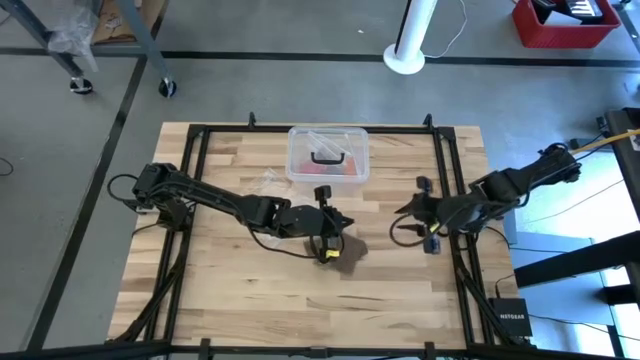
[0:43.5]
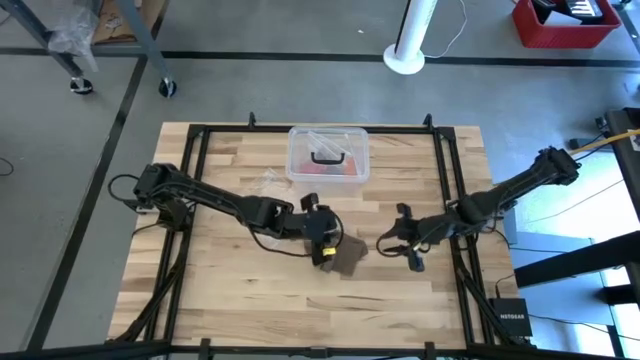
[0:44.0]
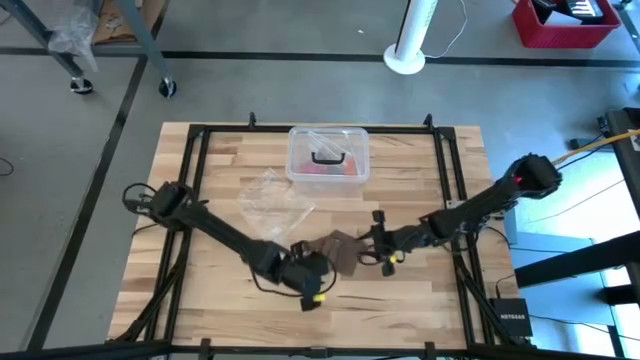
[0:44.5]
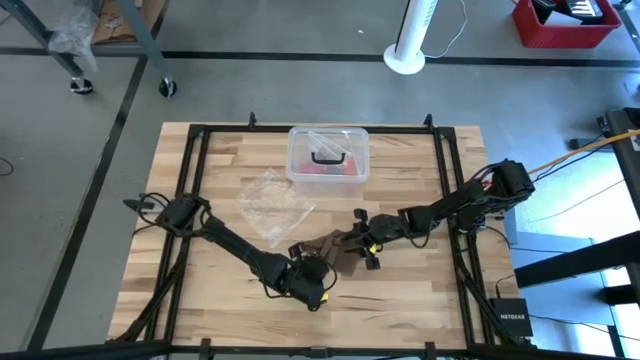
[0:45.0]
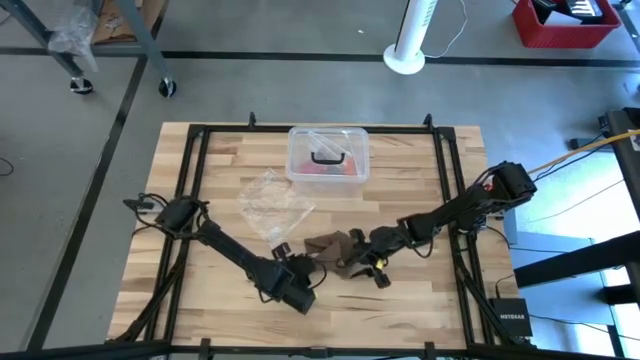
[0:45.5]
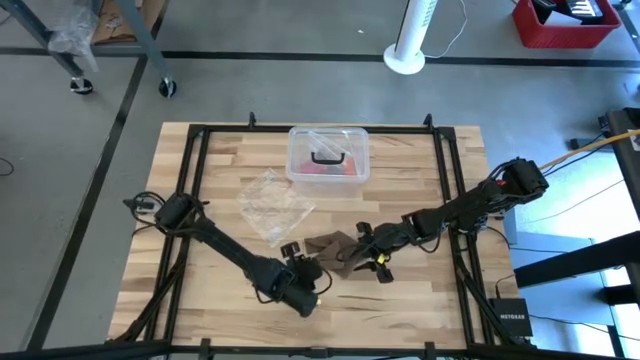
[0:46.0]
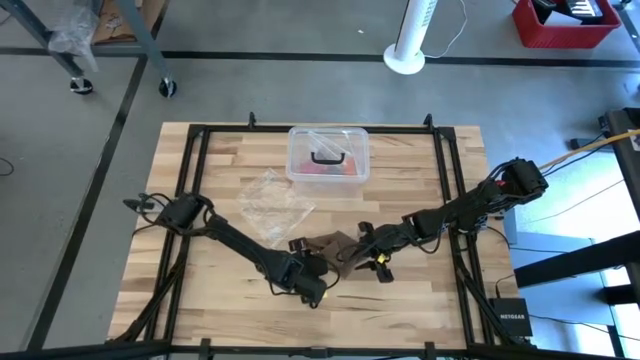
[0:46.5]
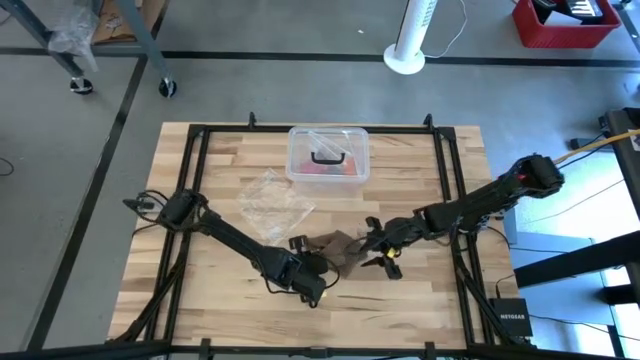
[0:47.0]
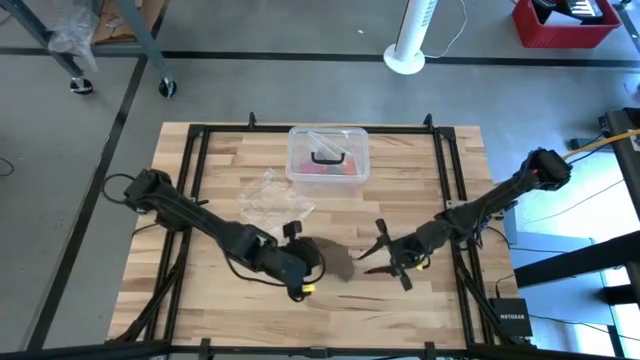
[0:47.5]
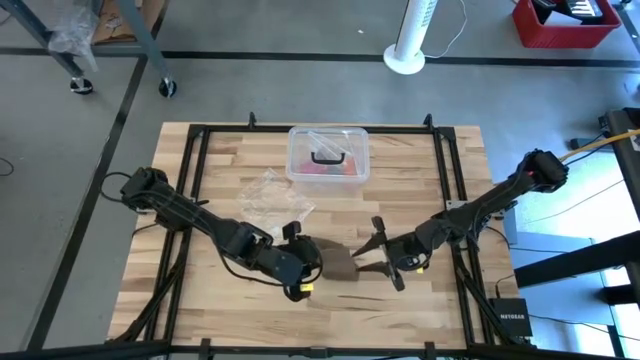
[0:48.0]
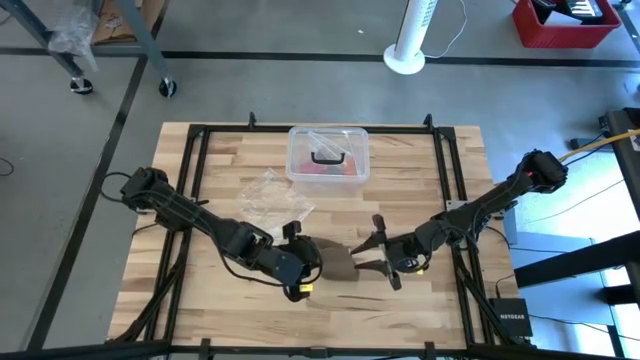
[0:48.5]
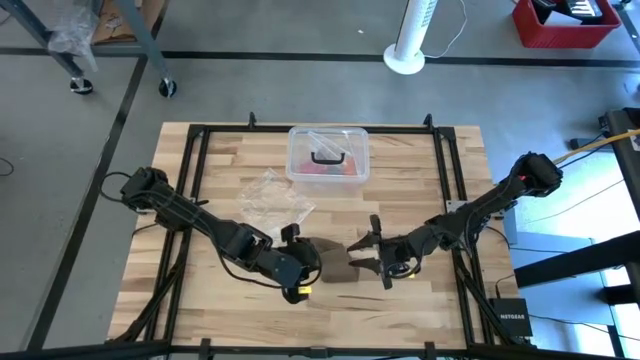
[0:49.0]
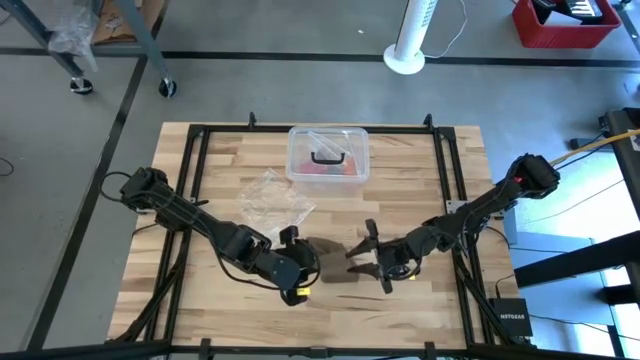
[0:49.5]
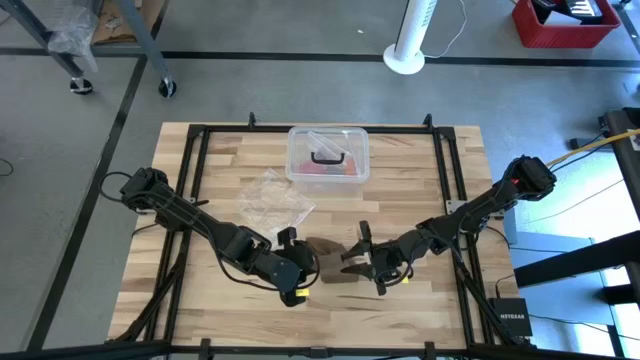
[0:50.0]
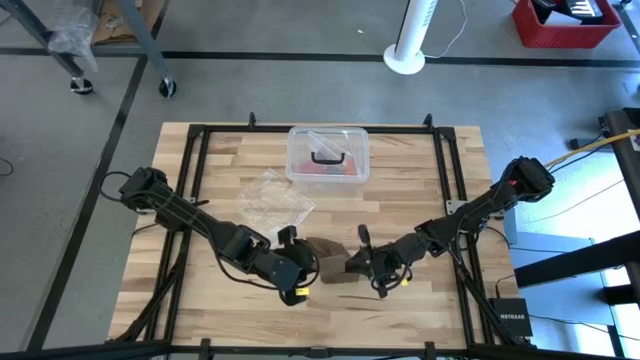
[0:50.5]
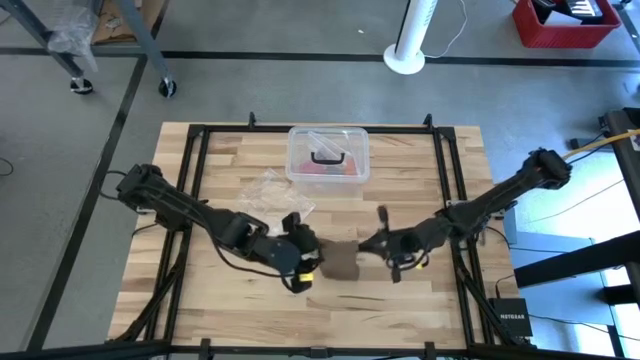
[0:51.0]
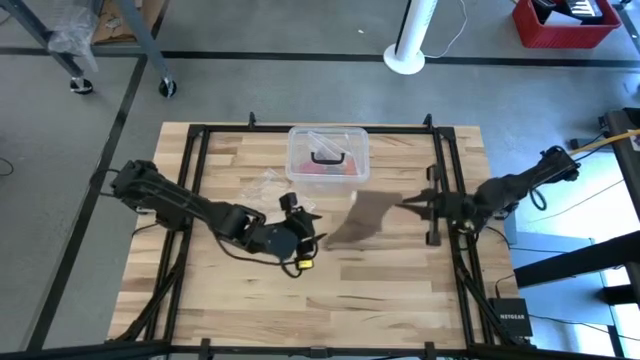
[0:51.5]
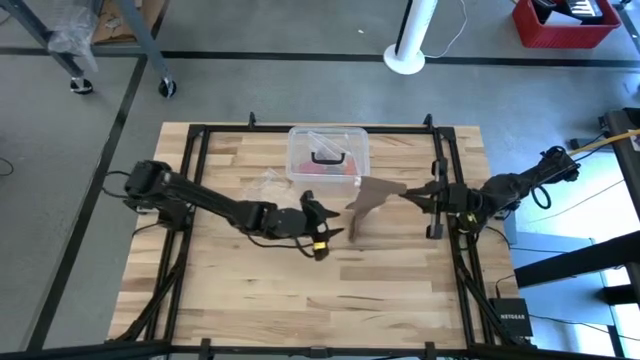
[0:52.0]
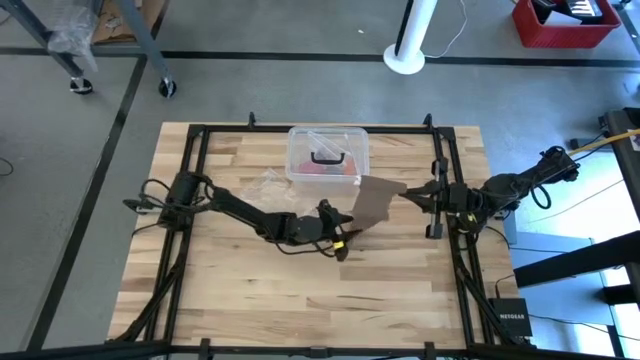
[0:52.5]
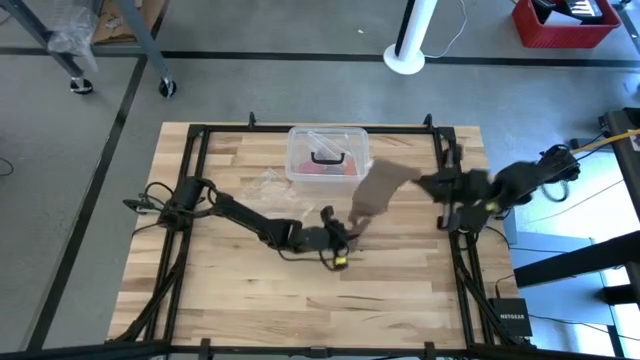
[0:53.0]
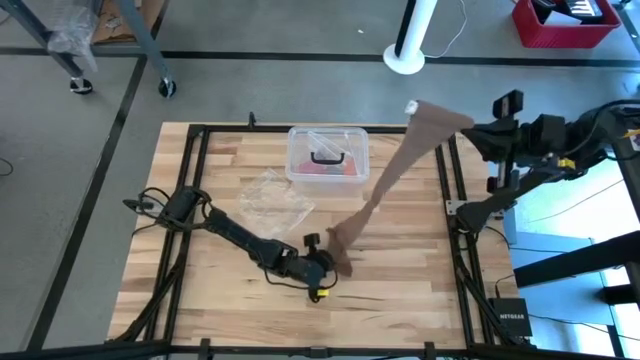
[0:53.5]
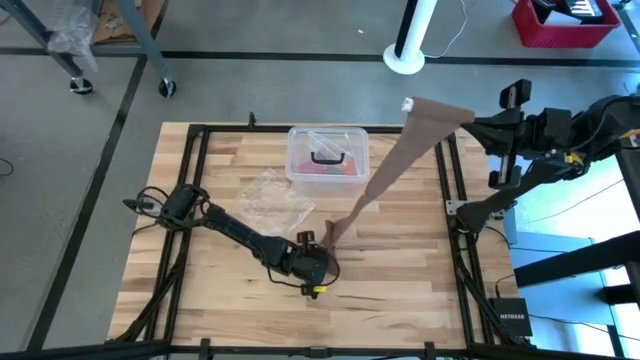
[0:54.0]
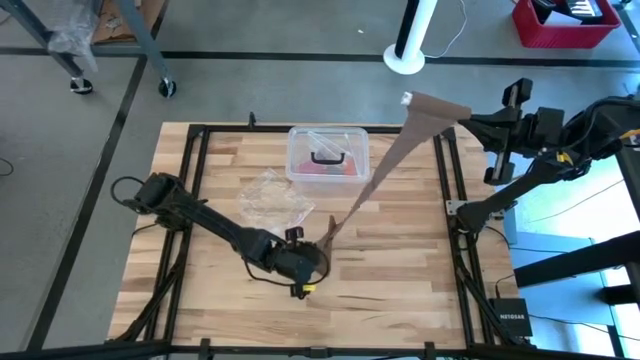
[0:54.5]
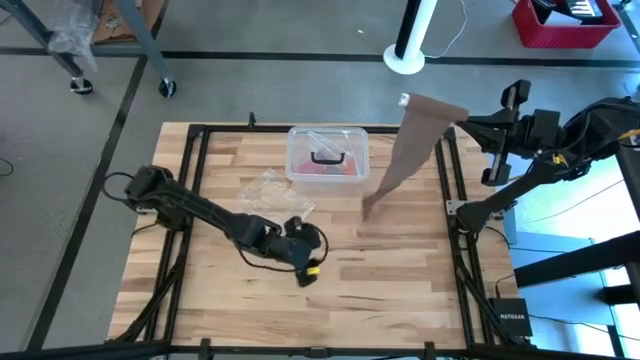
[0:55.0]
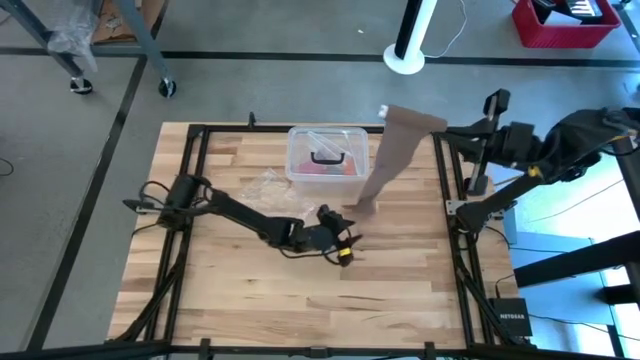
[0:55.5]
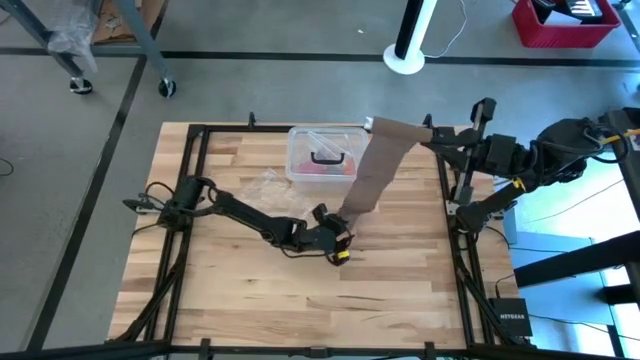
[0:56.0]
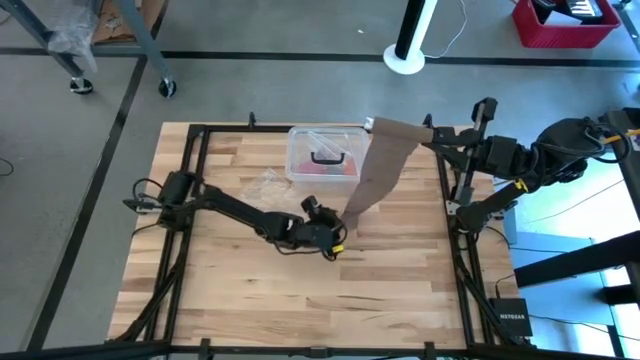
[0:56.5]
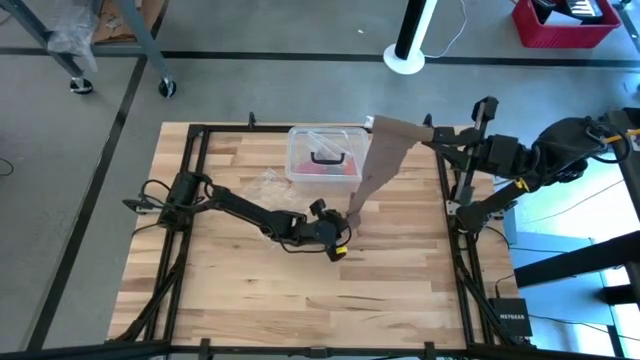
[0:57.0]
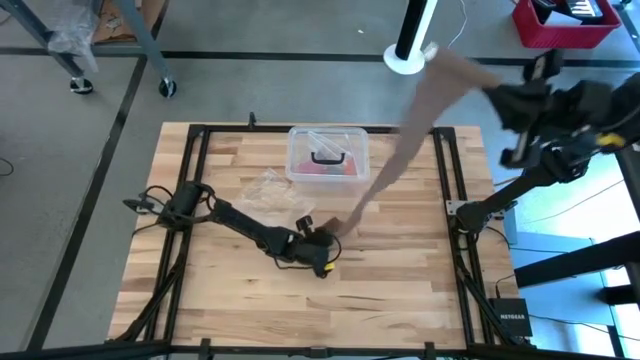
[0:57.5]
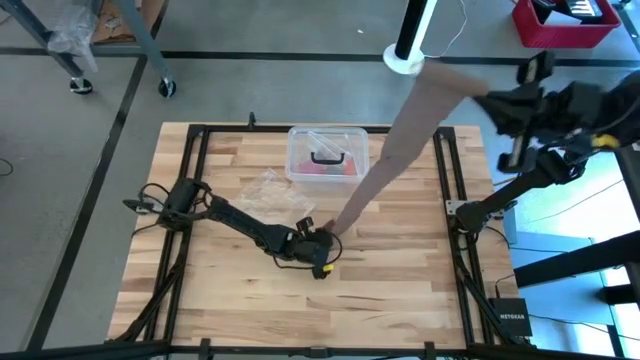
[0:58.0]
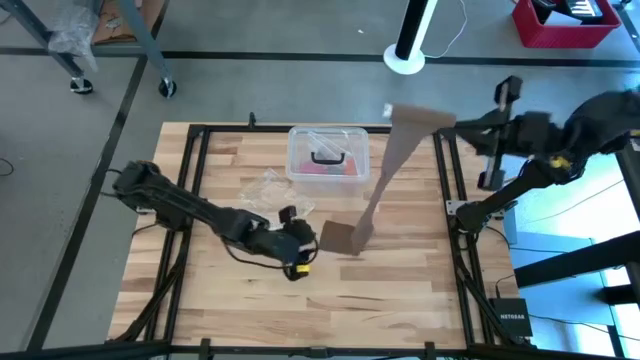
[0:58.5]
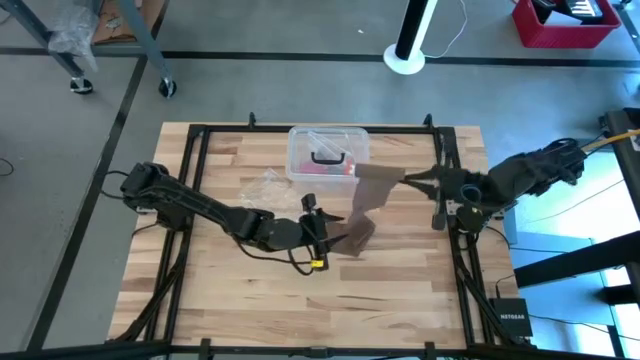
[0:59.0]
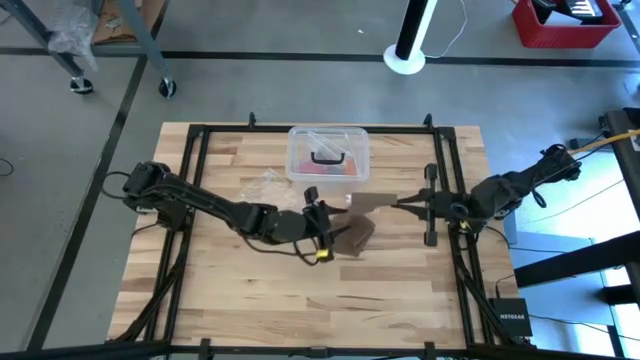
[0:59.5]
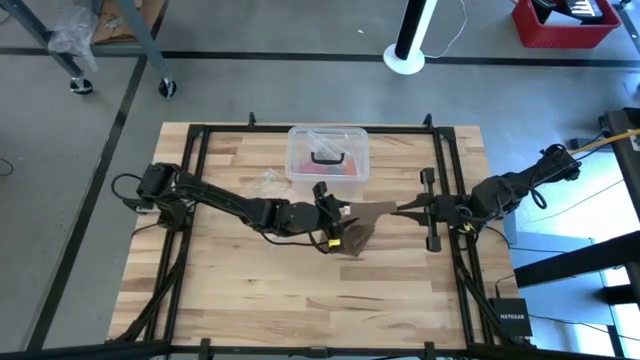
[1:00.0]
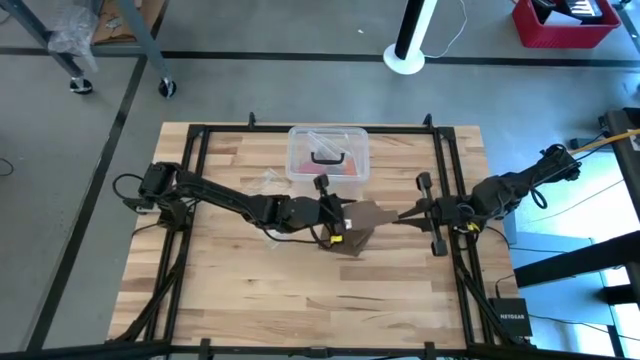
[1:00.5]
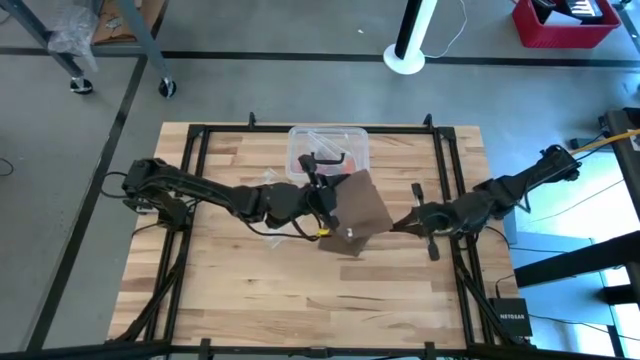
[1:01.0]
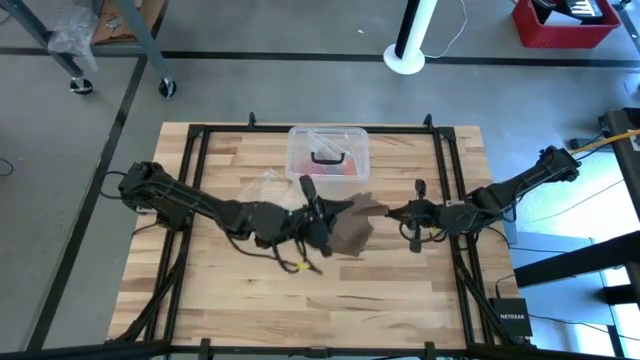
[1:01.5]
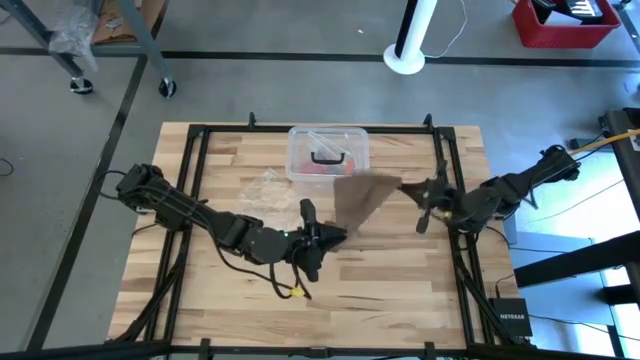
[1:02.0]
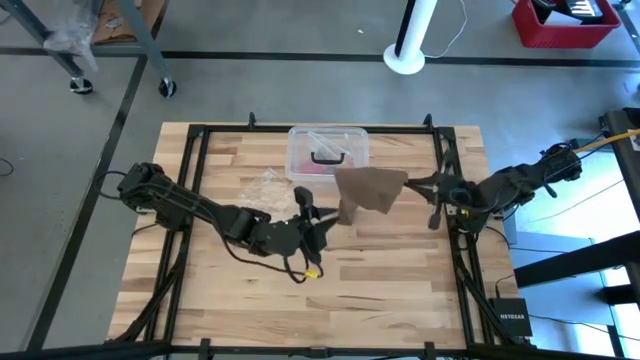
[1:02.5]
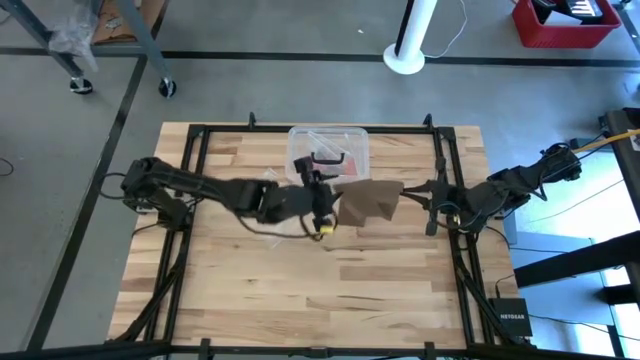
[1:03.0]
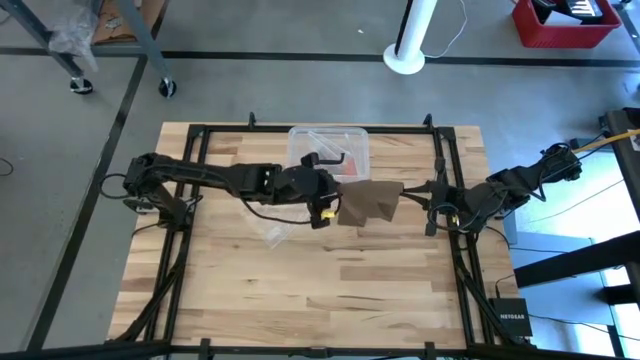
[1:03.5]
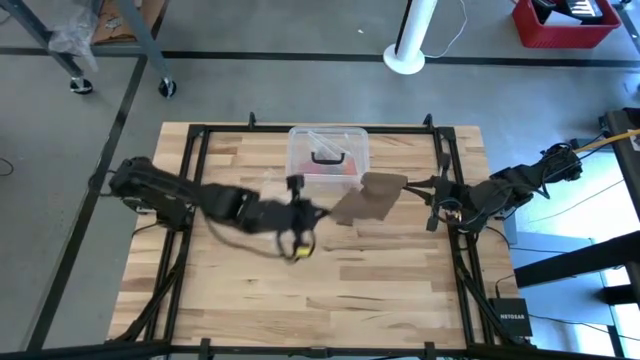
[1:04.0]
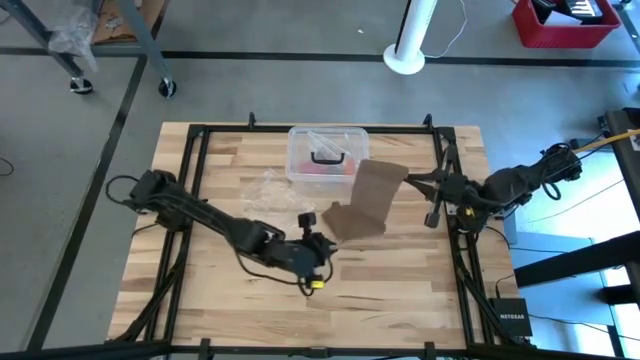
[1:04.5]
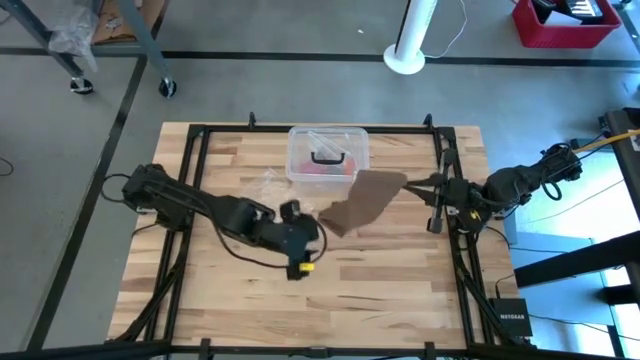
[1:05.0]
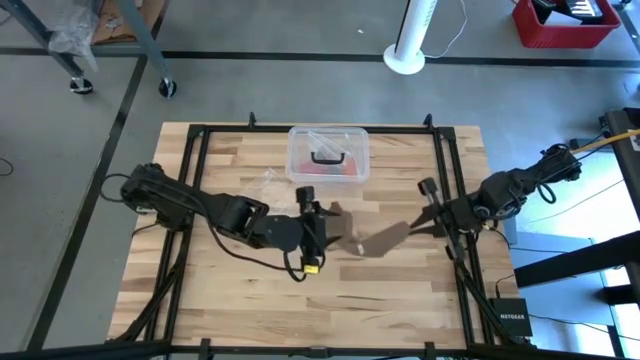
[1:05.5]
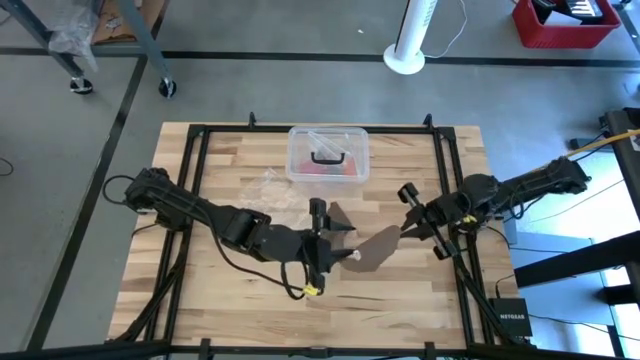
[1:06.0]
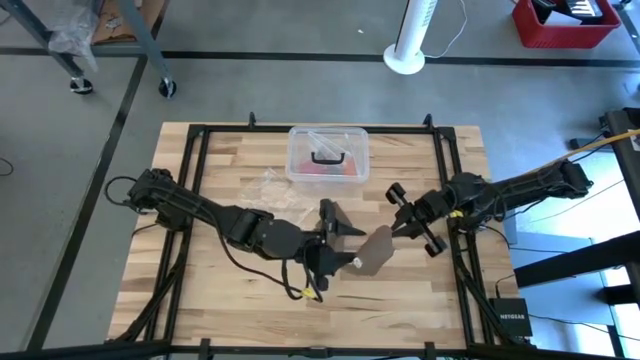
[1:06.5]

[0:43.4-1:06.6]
Task: Roll bandage
Roll the brown bandage
